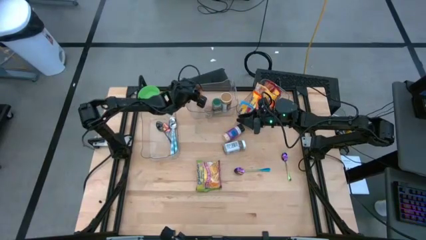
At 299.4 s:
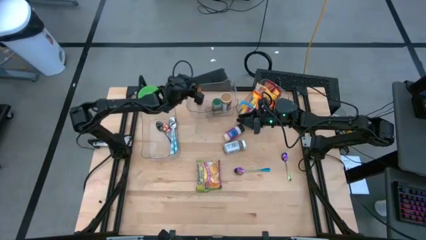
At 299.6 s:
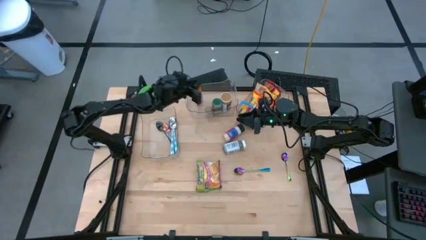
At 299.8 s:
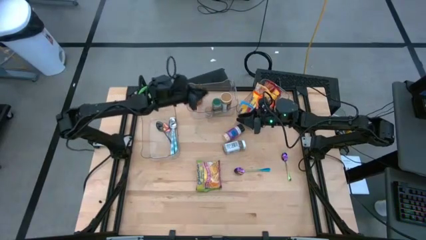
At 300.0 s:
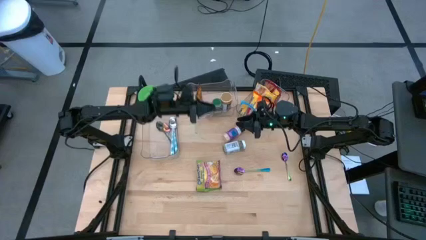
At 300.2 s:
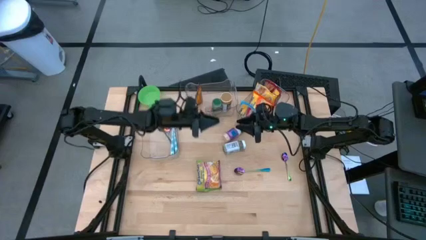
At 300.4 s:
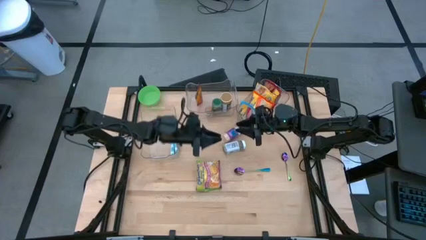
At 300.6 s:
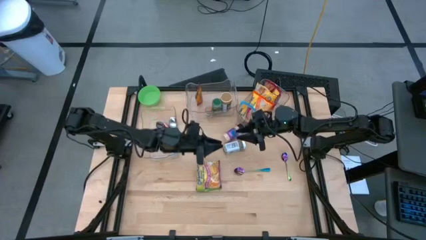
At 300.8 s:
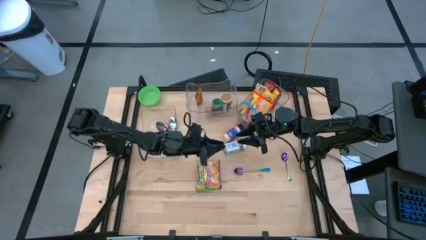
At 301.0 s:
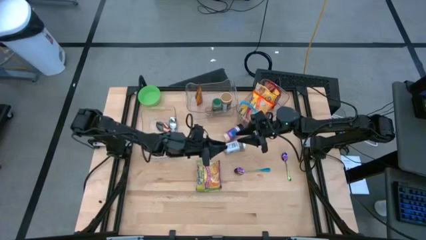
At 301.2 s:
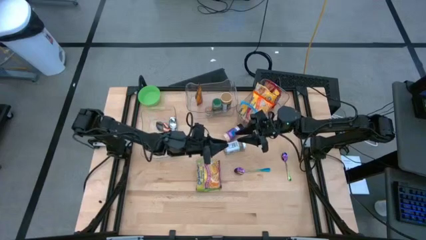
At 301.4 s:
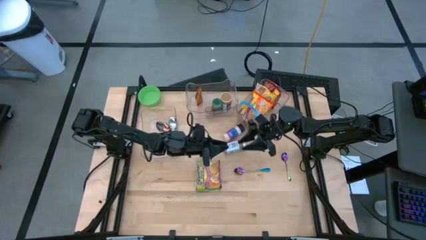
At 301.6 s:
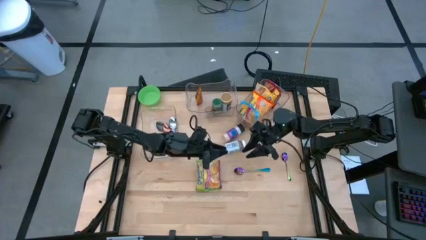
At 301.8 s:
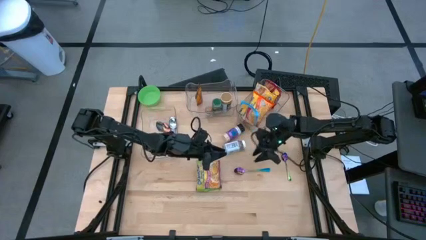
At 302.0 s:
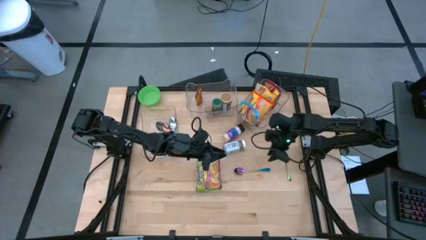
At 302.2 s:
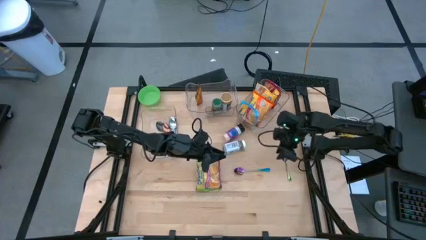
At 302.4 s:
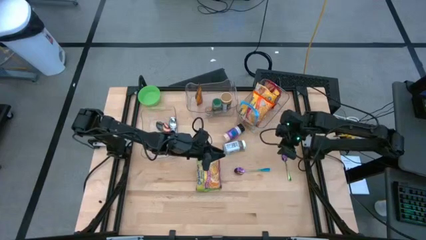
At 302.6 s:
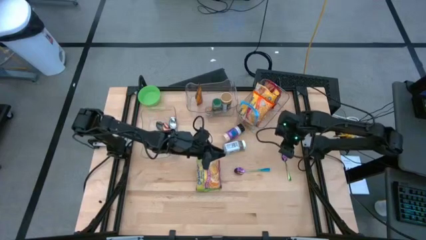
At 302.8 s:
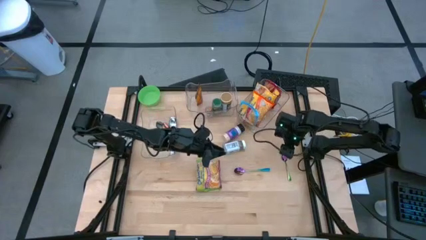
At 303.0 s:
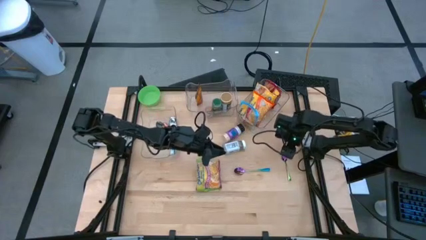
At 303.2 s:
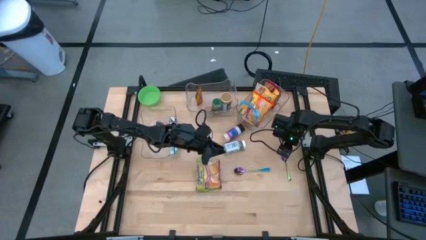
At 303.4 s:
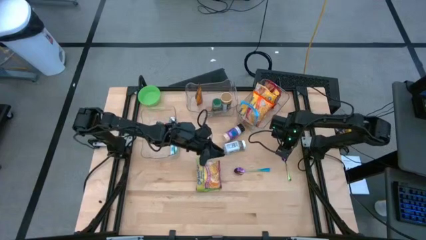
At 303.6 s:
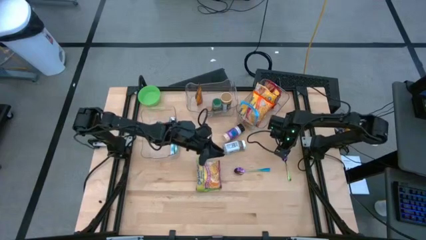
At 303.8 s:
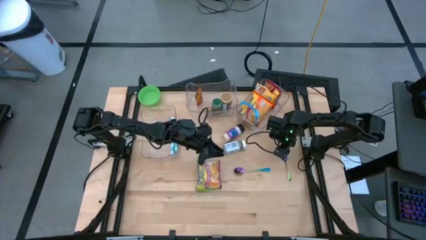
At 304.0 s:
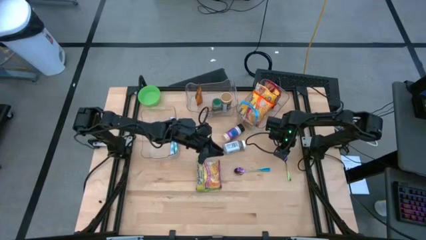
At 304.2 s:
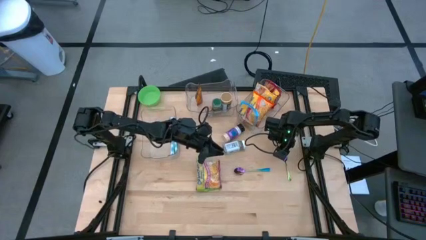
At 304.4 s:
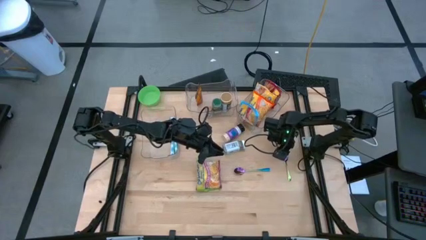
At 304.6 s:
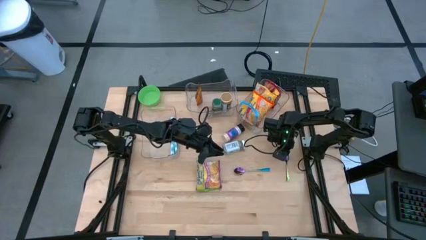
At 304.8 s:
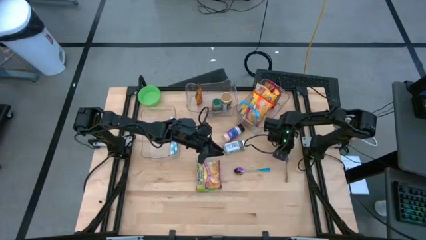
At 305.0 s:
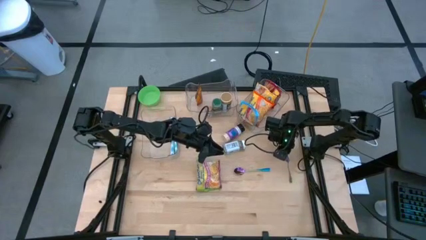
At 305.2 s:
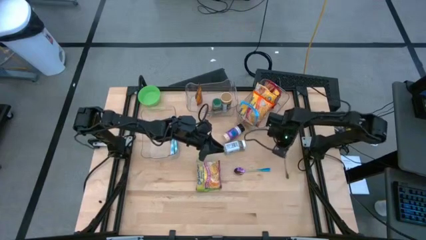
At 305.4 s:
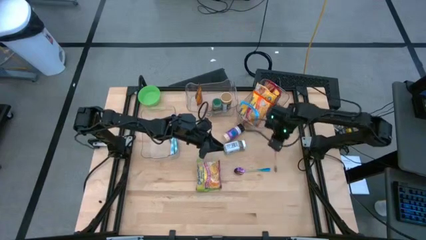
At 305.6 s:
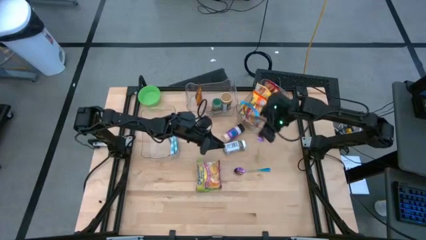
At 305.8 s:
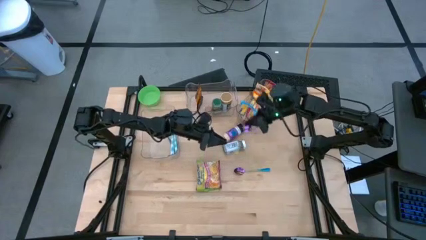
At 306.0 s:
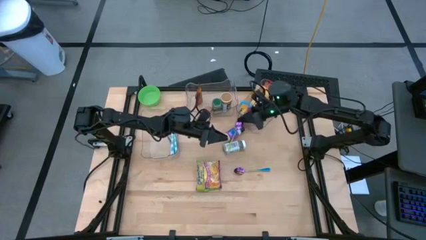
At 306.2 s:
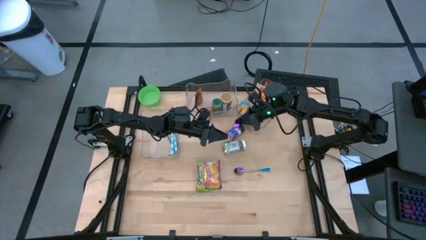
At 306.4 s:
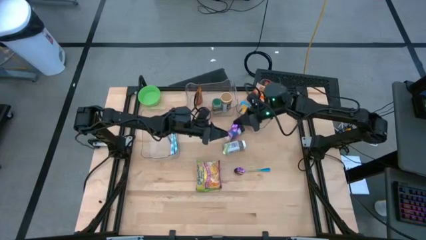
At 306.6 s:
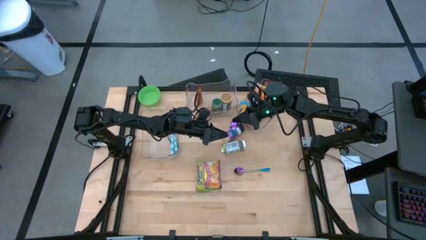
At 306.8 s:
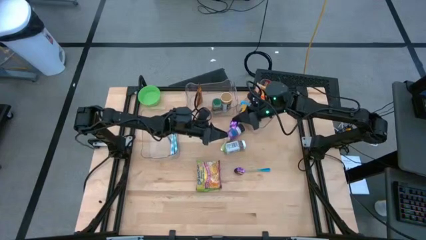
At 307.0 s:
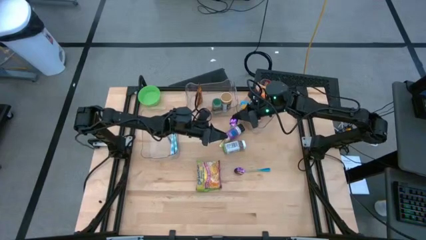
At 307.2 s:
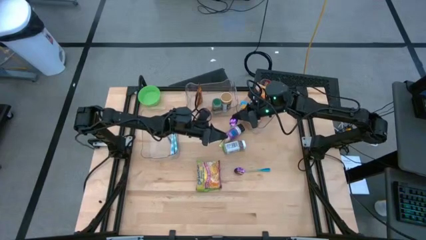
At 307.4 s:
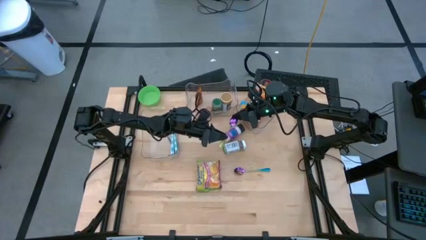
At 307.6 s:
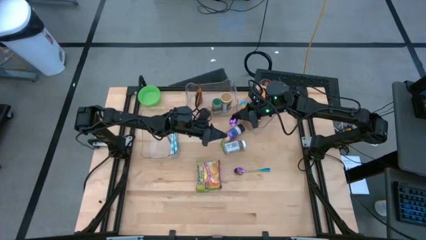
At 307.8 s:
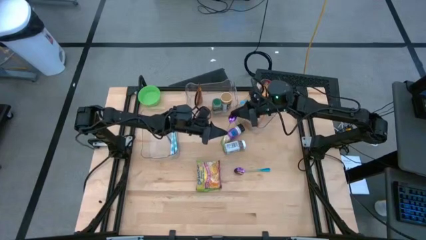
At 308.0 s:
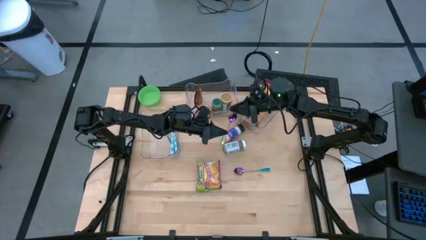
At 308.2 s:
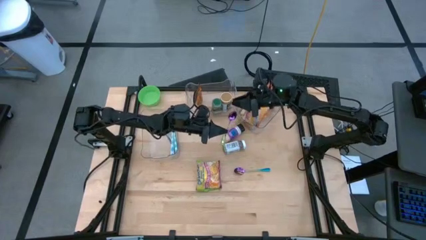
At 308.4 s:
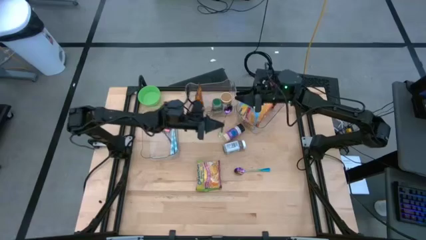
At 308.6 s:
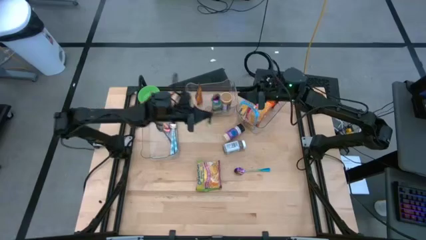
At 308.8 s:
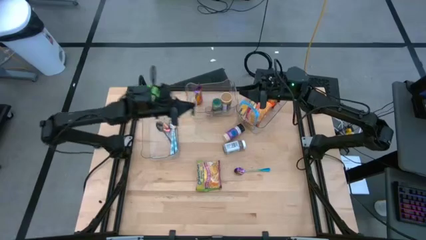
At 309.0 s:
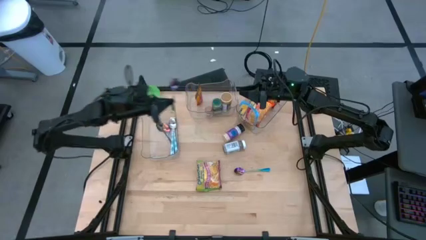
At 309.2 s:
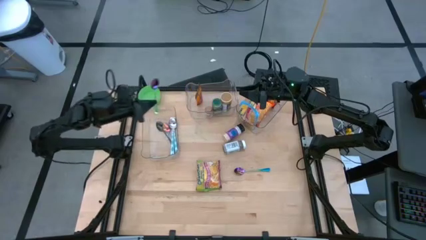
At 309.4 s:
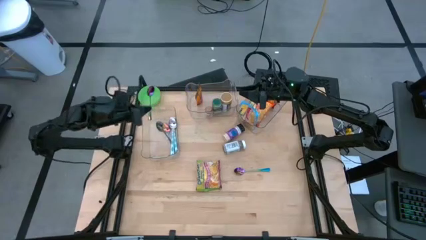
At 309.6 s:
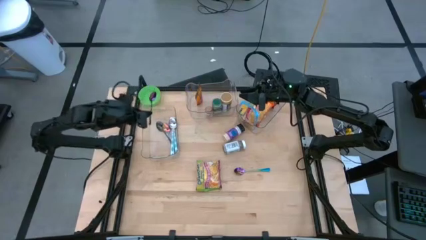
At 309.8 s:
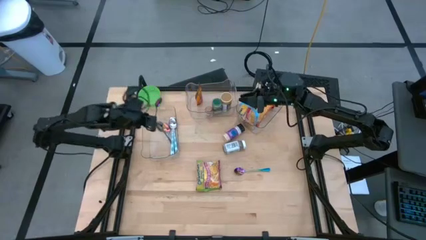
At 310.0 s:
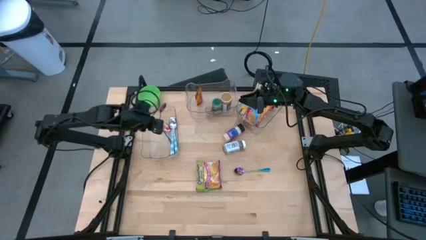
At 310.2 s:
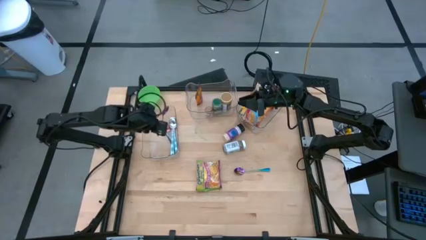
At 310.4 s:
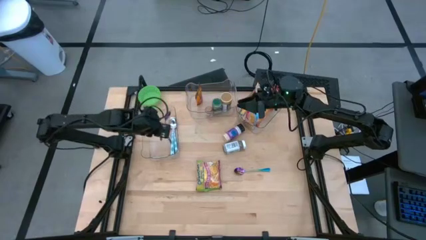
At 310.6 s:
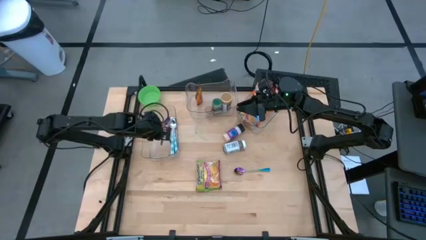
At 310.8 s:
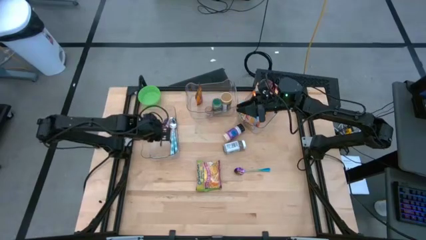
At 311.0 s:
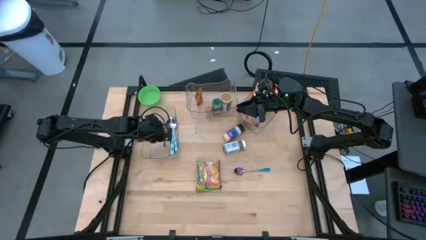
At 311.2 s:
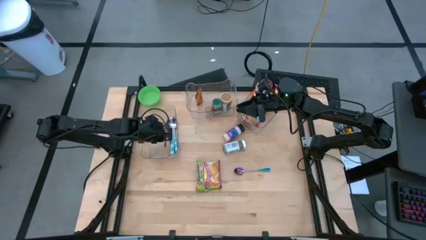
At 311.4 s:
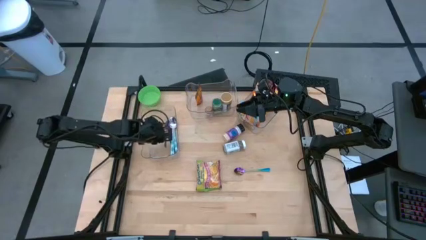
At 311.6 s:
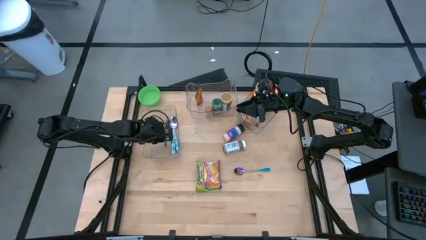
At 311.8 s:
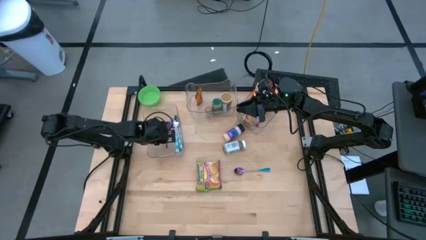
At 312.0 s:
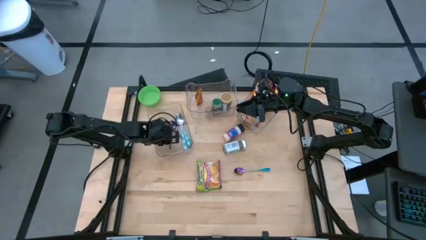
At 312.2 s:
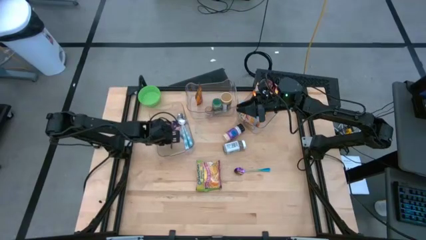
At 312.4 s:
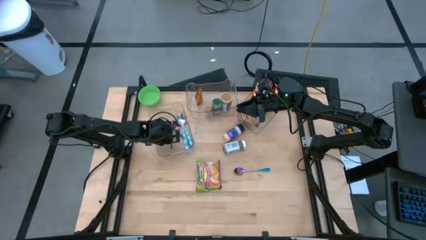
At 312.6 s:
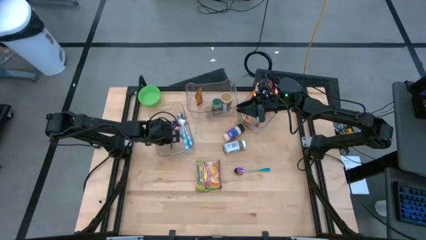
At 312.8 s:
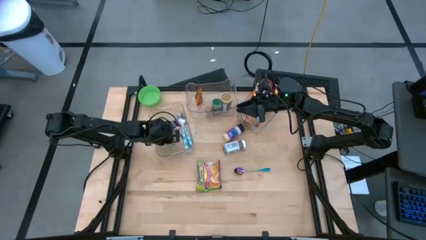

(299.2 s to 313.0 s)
Task: Pick & Place Food Item
Put the right violet spoon into the left transparent bin

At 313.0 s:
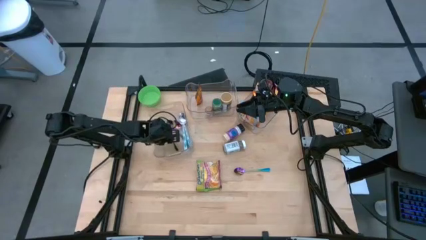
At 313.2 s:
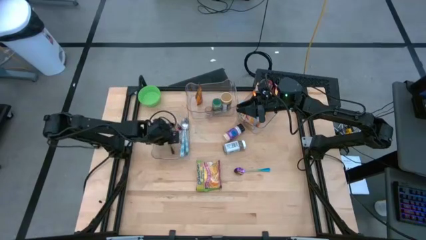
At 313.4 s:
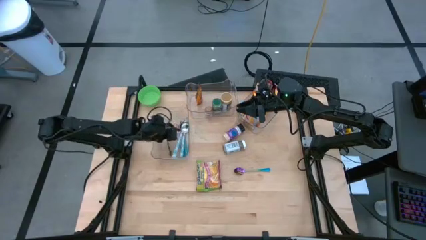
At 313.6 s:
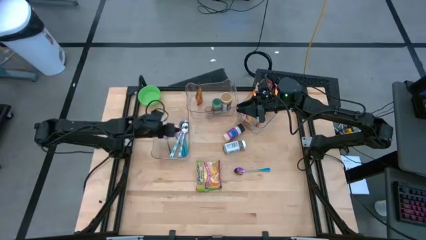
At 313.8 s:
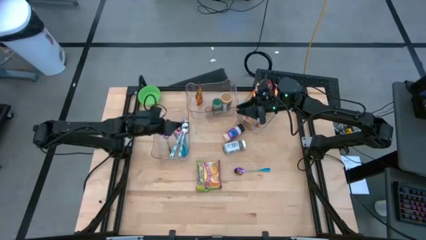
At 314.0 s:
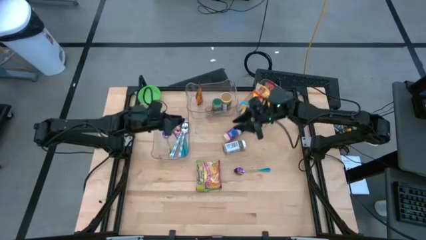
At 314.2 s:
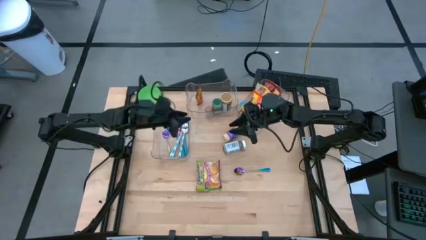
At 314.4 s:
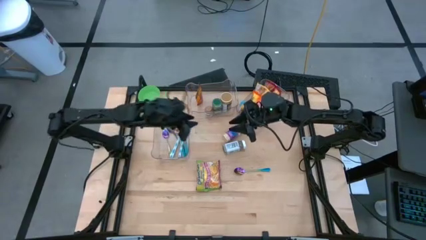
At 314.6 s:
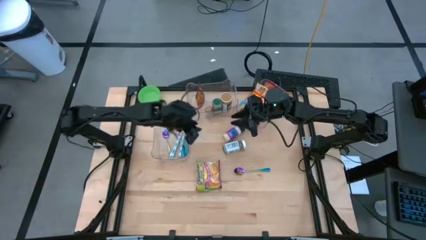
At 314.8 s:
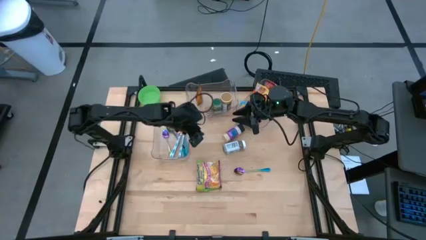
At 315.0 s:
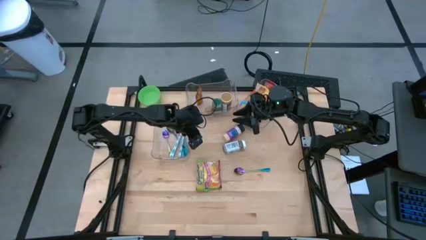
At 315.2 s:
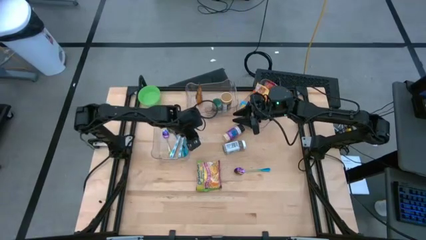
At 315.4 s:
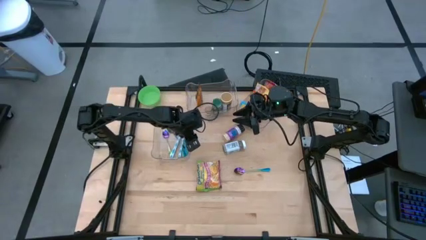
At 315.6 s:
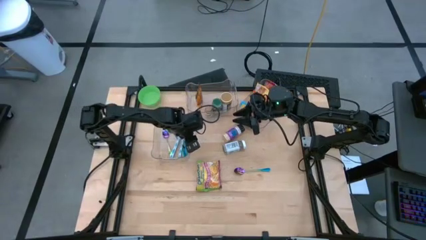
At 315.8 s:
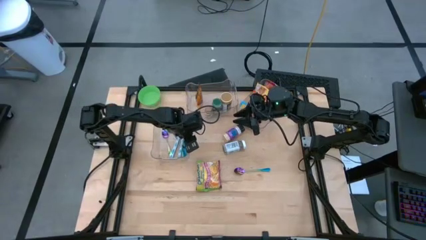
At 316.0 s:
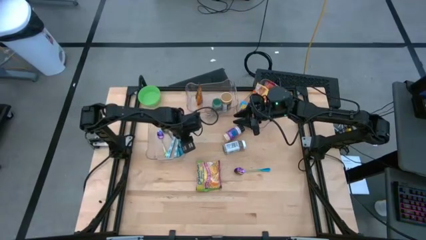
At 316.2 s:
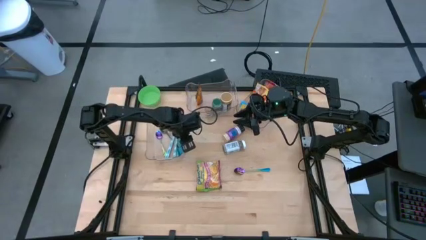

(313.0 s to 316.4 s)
Adjust the left transparent bin
